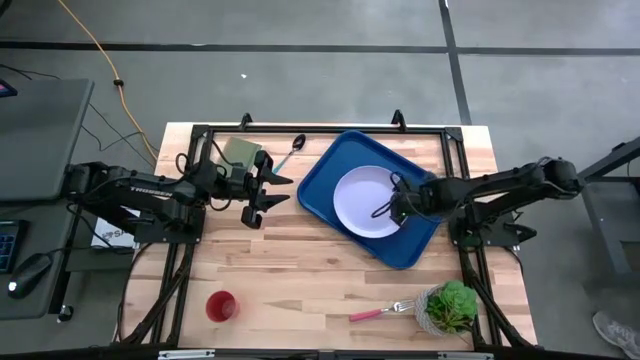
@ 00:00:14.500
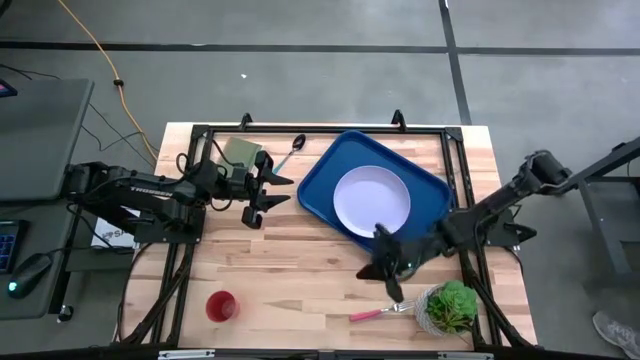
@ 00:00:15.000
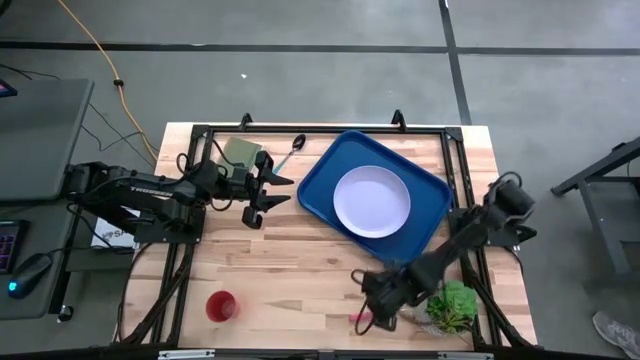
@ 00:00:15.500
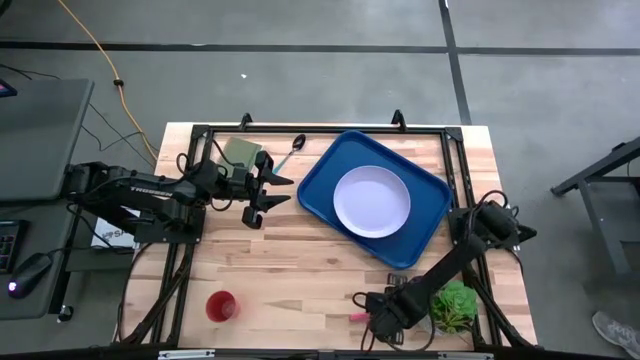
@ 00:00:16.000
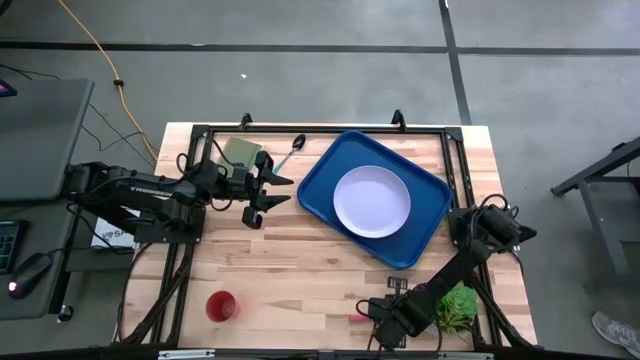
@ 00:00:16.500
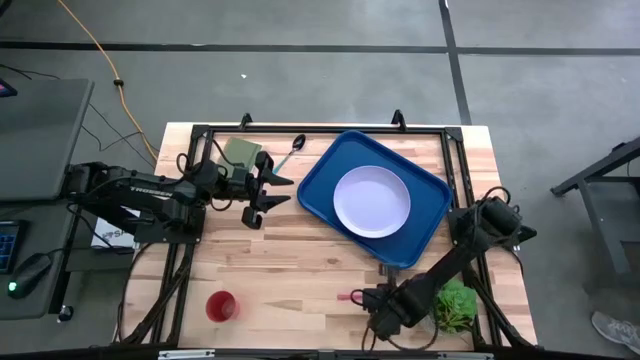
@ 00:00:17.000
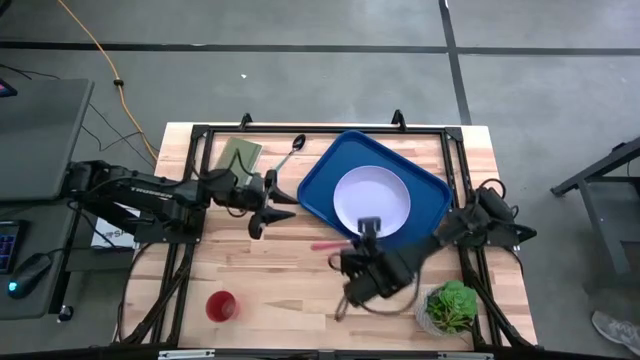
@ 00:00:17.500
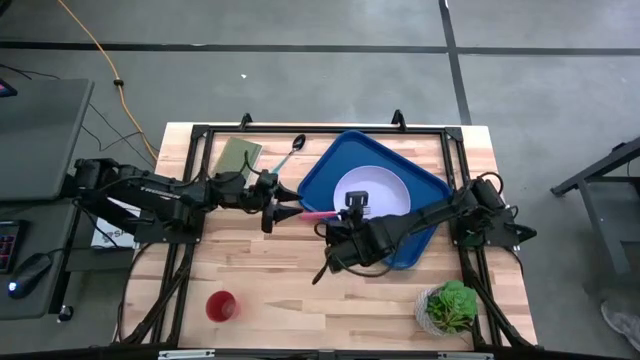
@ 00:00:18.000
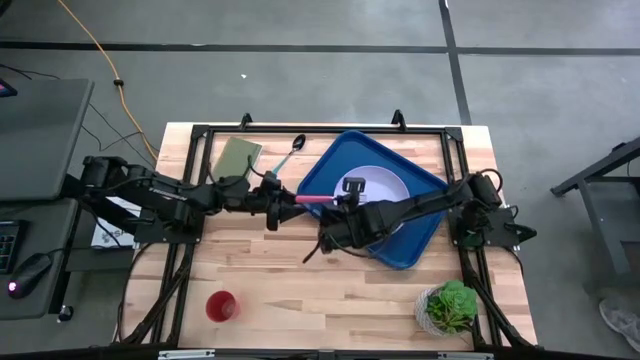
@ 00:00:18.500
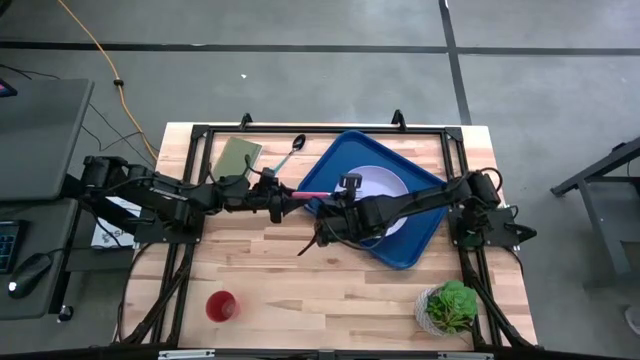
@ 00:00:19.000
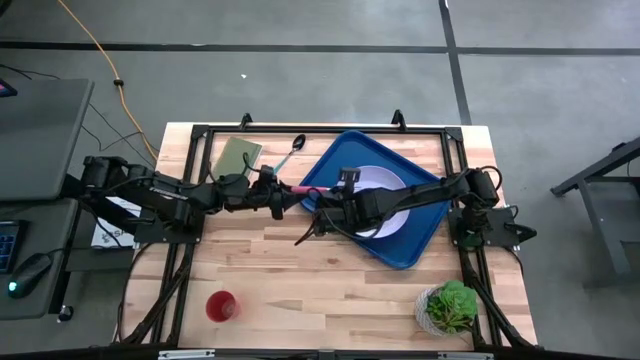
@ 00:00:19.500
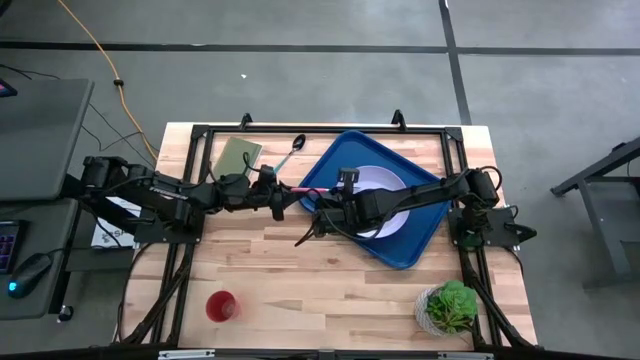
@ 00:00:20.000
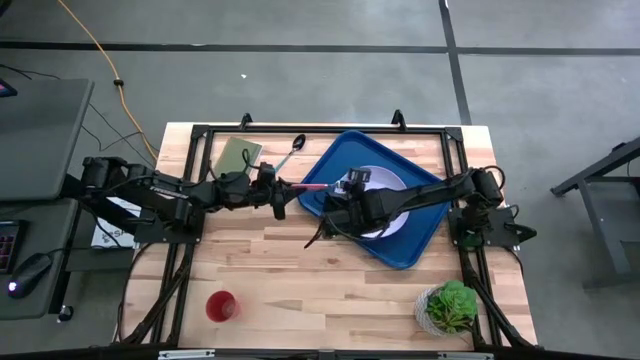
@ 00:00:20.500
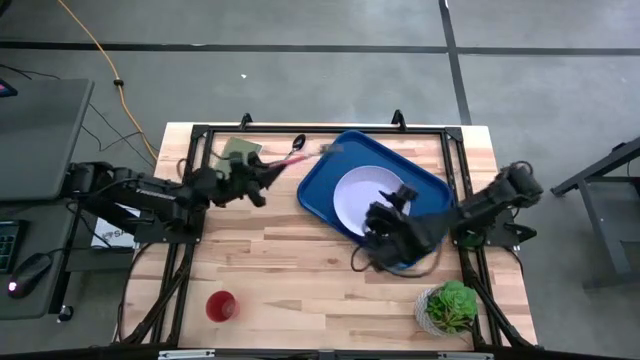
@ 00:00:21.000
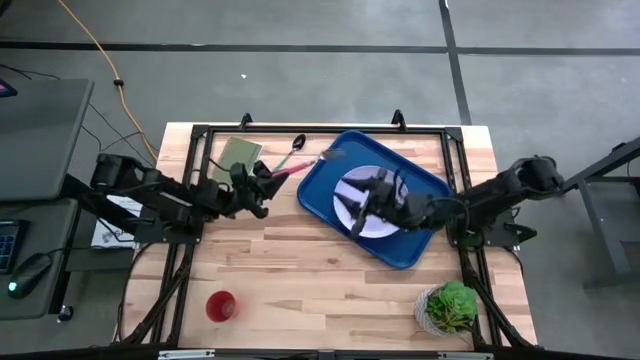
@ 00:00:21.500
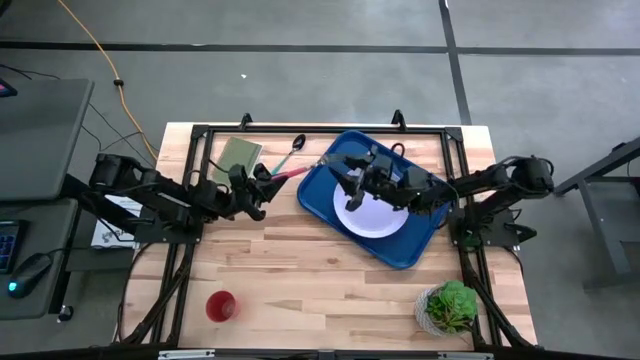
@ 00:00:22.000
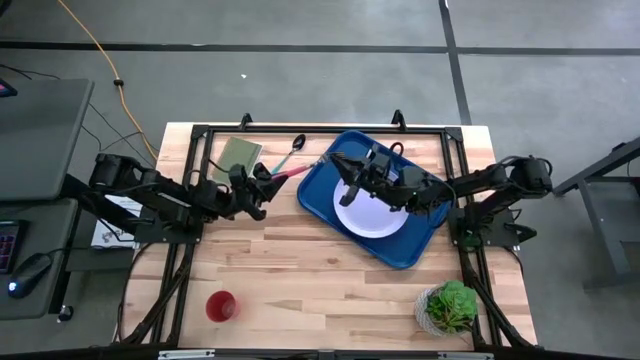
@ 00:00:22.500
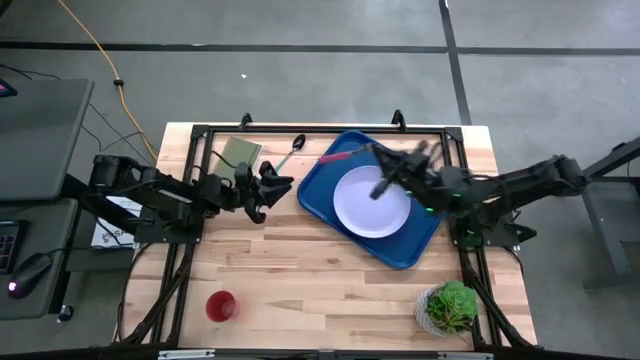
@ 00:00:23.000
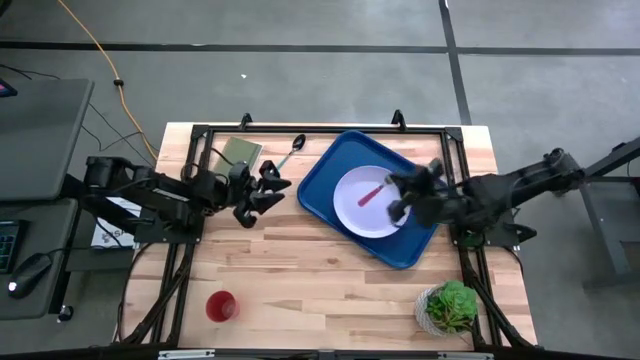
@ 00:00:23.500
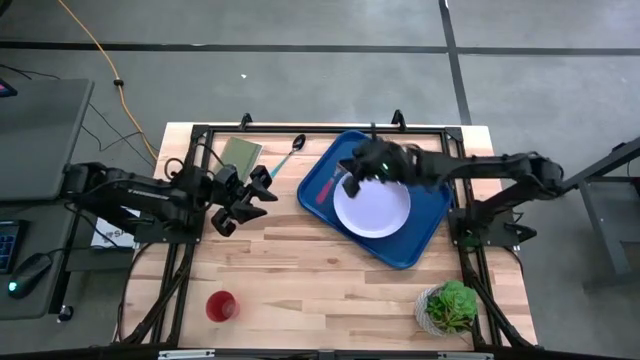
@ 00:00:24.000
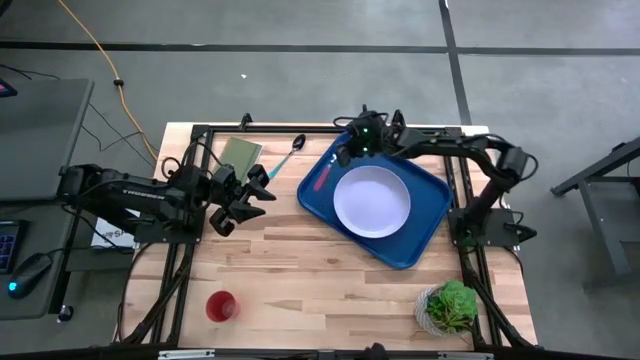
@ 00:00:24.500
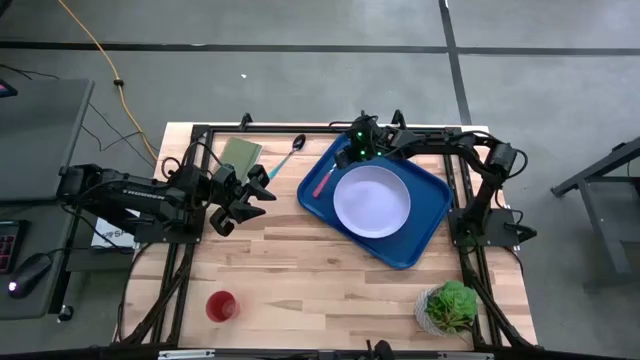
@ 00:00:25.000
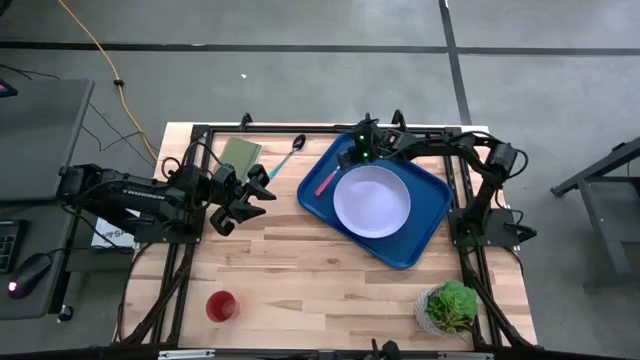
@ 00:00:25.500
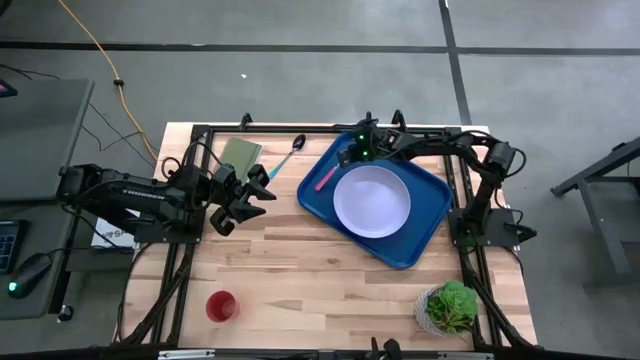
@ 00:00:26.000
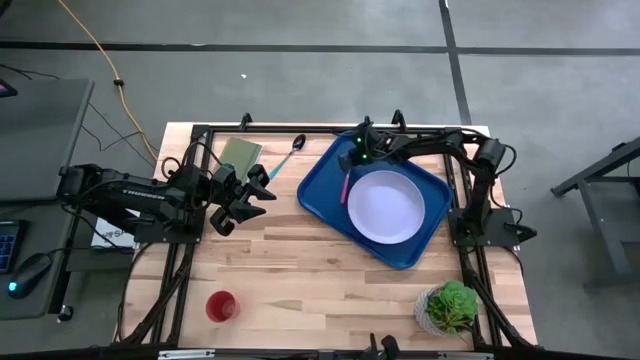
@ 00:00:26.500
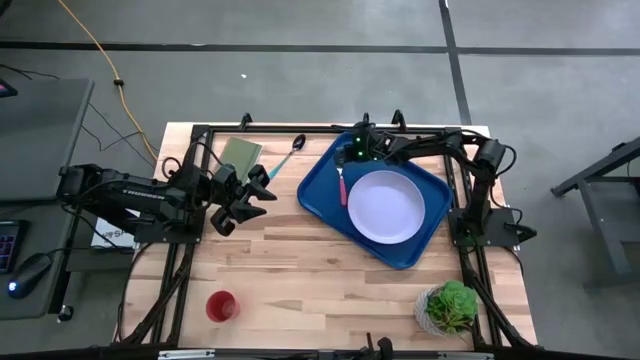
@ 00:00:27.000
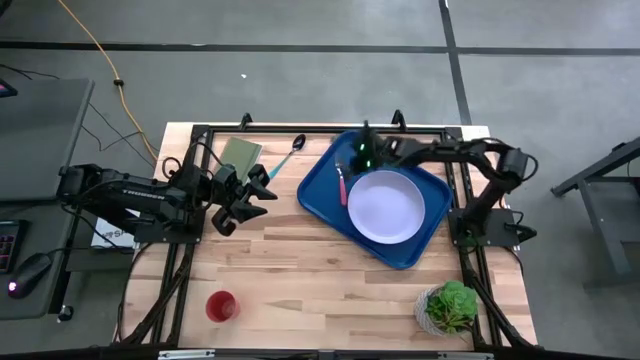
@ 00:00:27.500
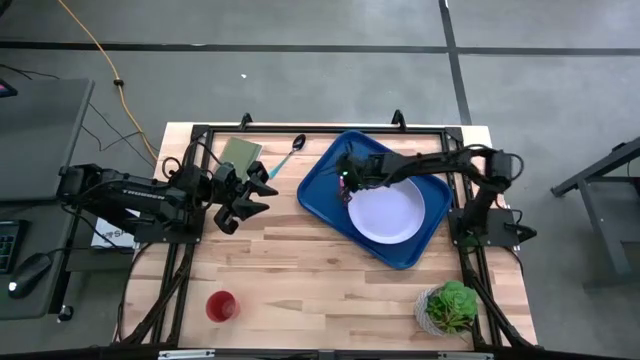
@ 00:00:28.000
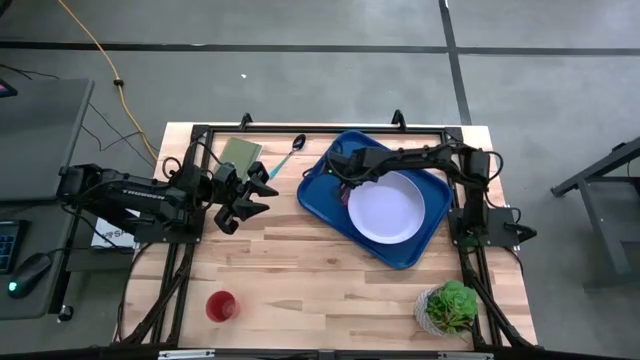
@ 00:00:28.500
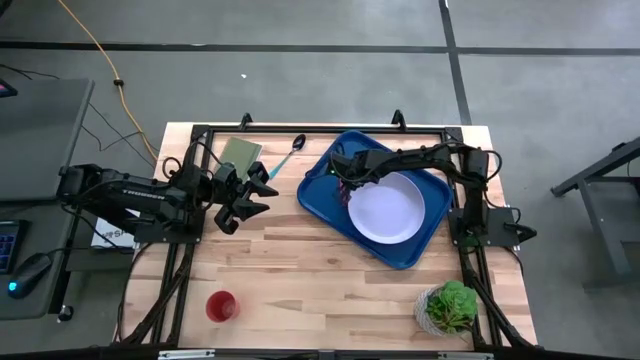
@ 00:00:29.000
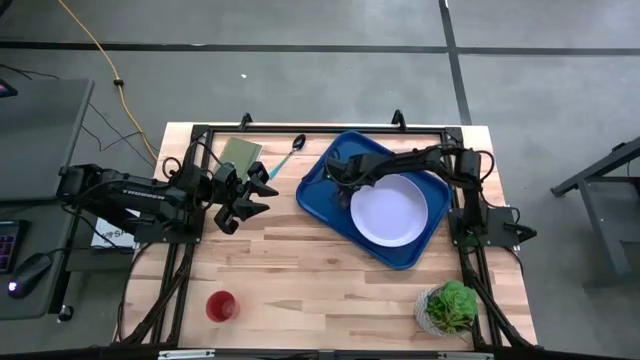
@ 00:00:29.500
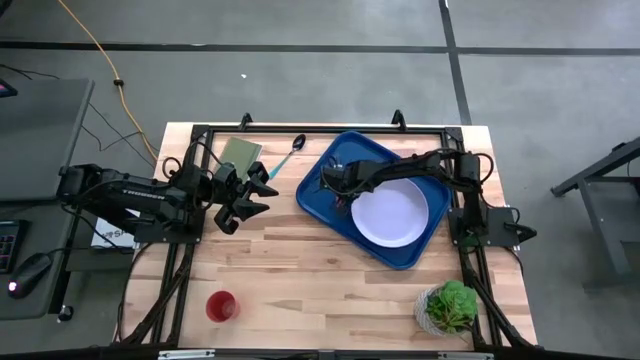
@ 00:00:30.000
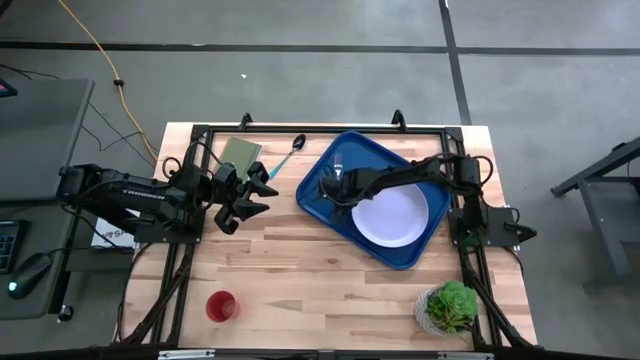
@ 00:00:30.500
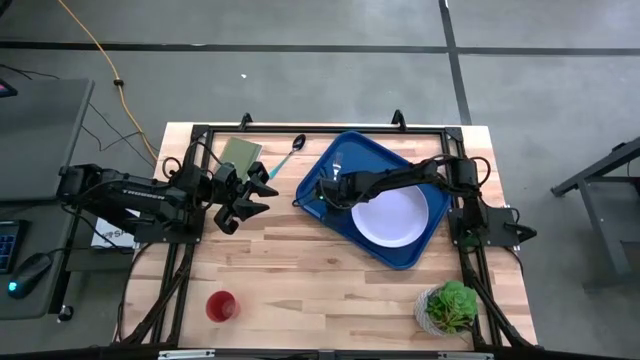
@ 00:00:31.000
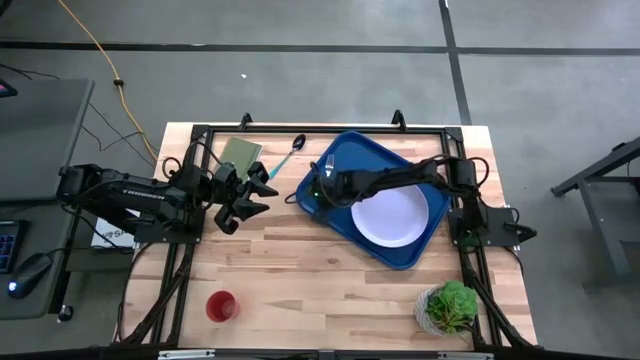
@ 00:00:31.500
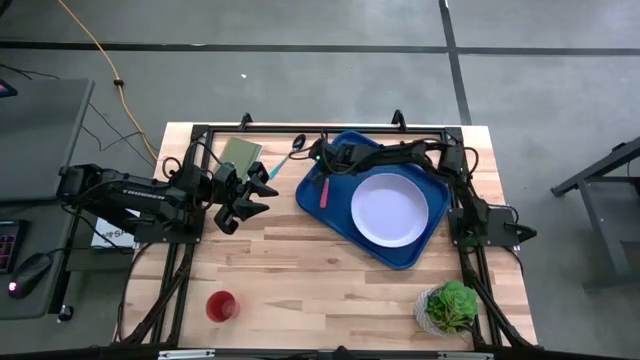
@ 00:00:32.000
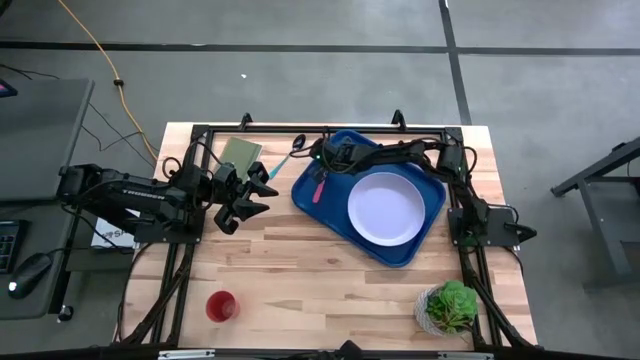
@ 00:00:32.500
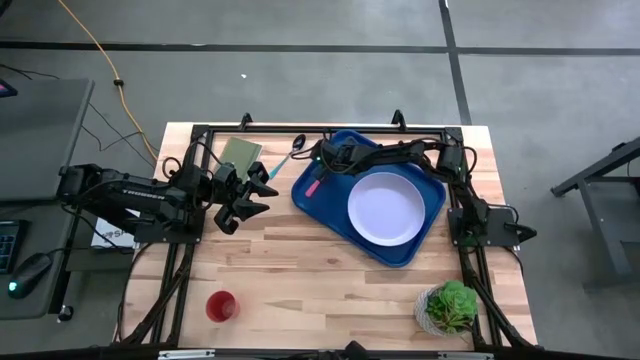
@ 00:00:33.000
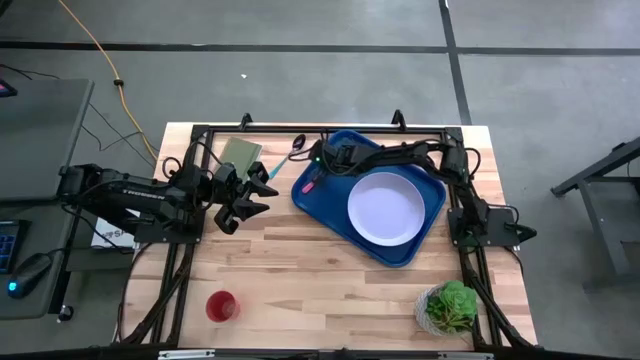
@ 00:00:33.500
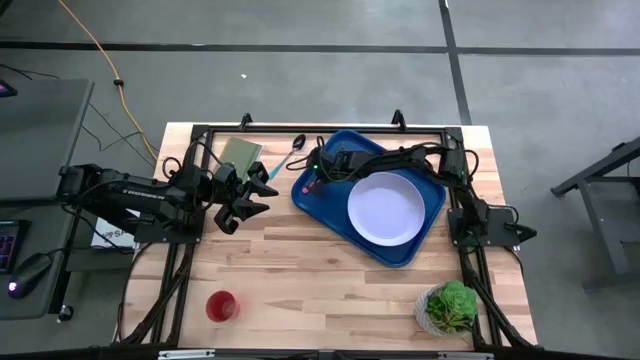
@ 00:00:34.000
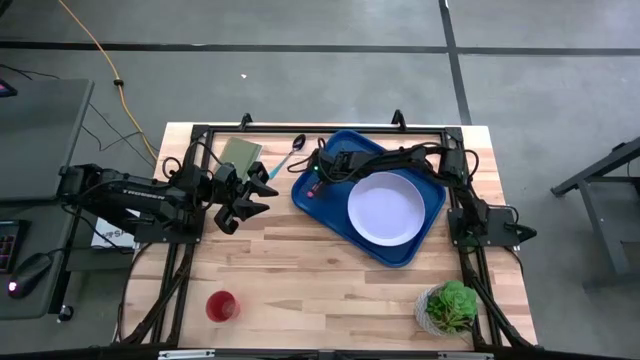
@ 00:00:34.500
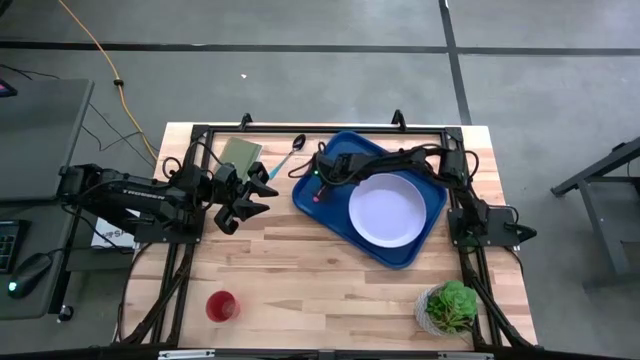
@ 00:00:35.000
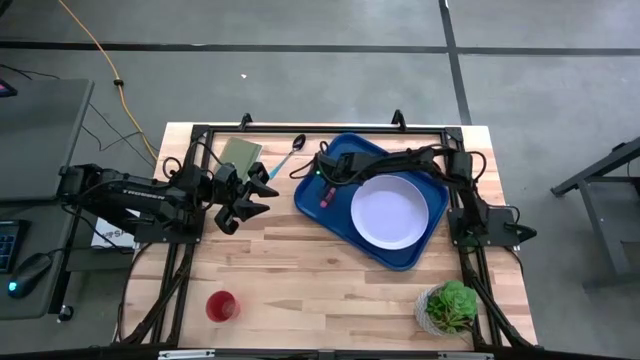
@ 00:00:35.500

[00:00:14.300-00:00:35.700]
Task: Pick and place plate/cup/fork/spoon on tray
Put the pink fork on the blue tray

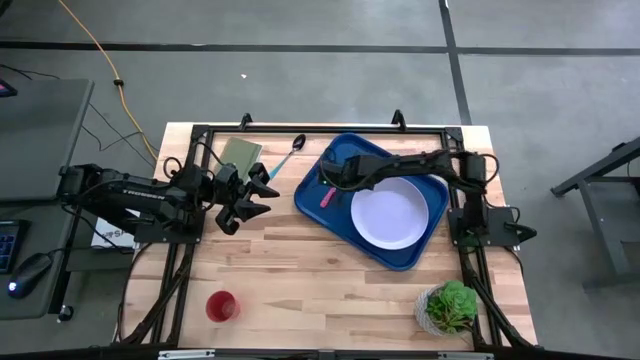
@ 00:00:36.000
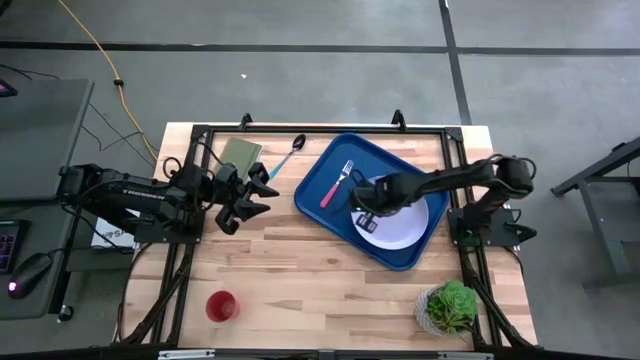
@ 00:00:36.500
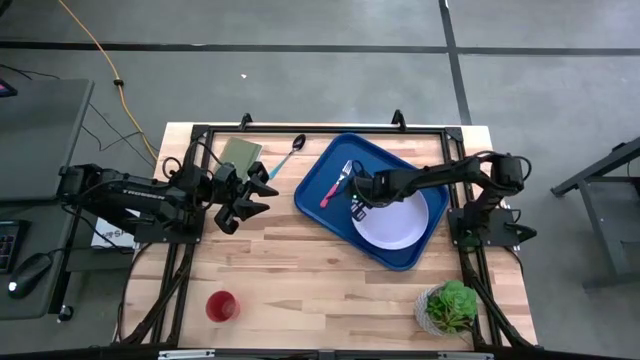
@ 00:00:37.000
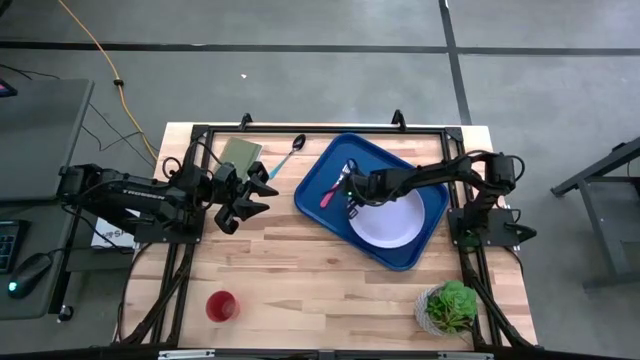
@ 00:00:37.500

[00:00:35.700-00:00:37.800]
Adjust the white plate
